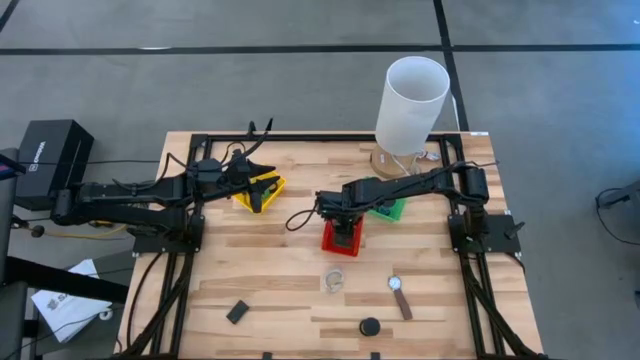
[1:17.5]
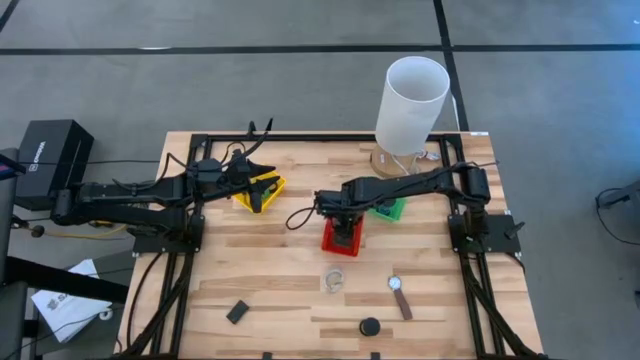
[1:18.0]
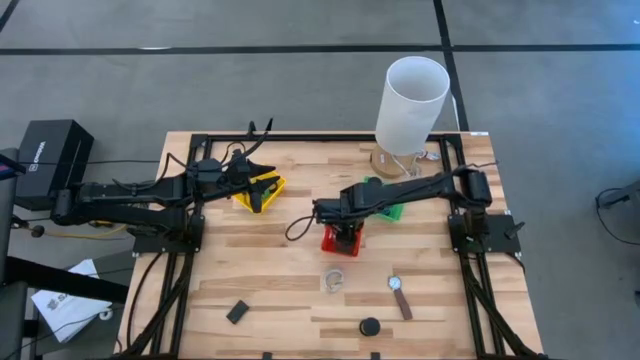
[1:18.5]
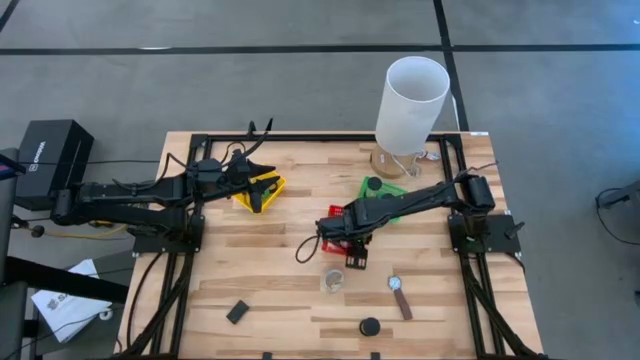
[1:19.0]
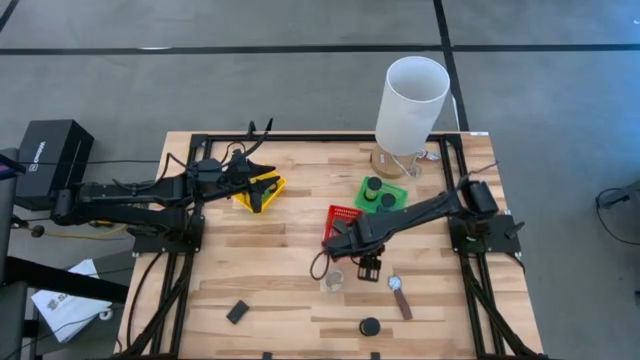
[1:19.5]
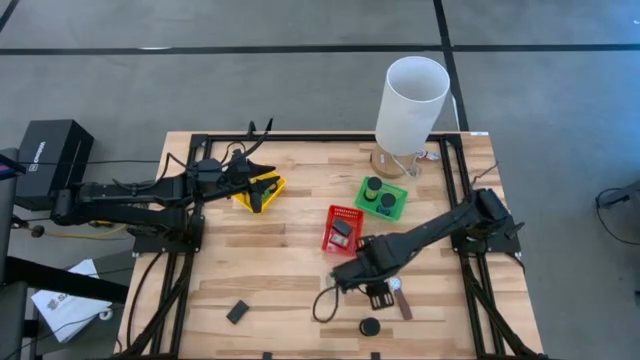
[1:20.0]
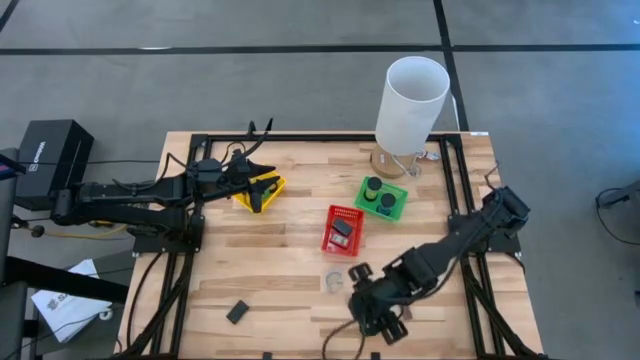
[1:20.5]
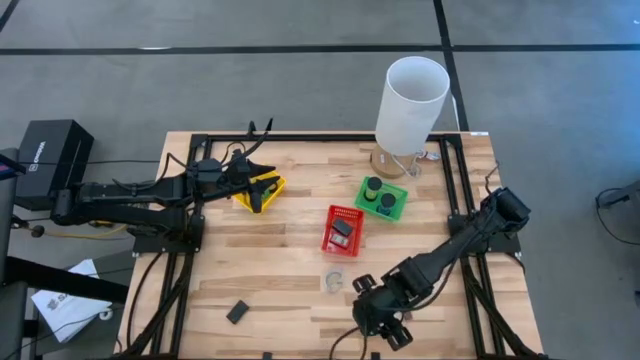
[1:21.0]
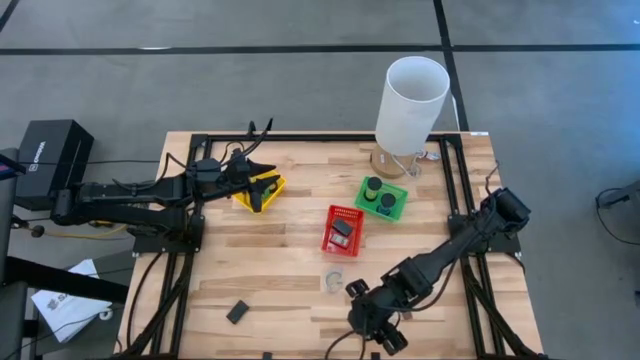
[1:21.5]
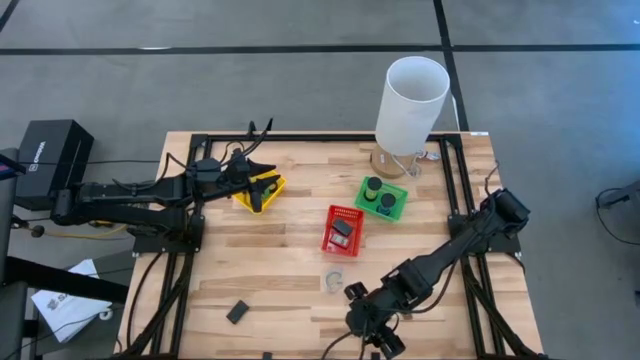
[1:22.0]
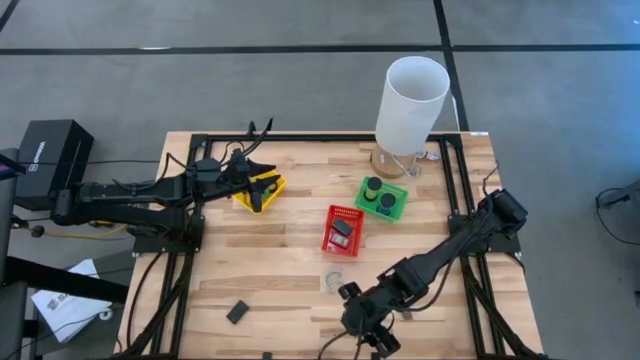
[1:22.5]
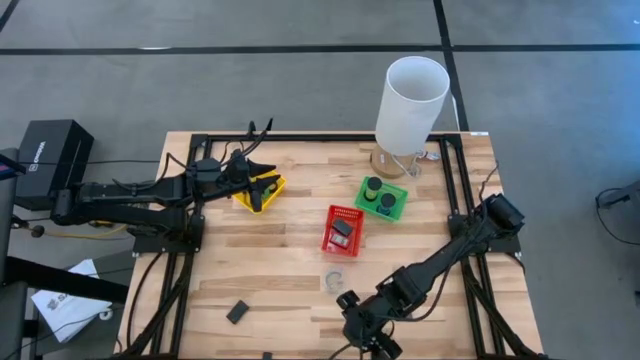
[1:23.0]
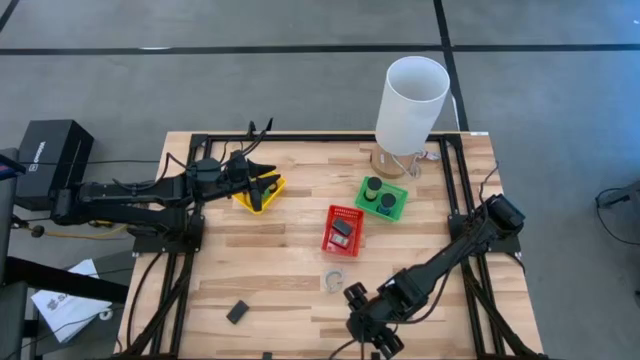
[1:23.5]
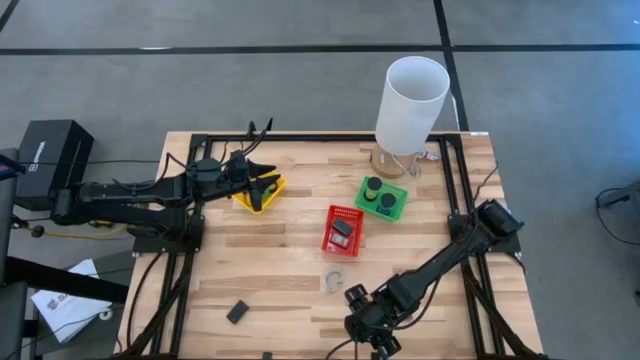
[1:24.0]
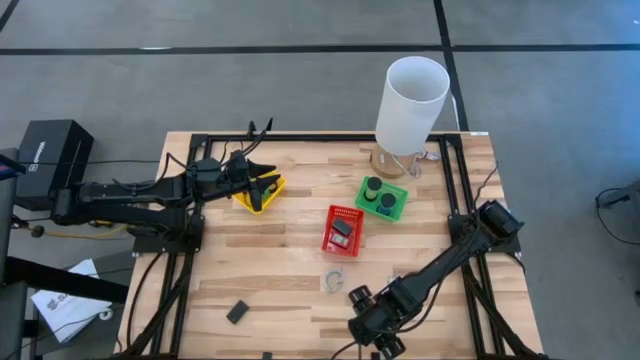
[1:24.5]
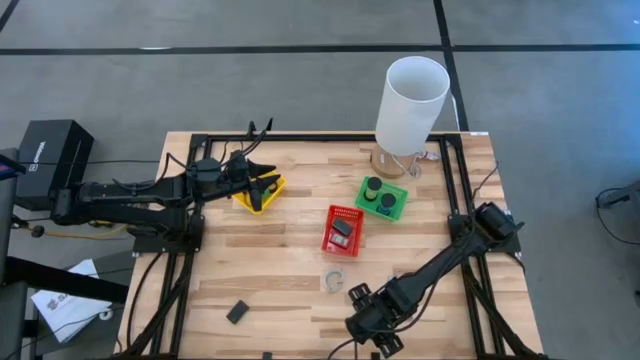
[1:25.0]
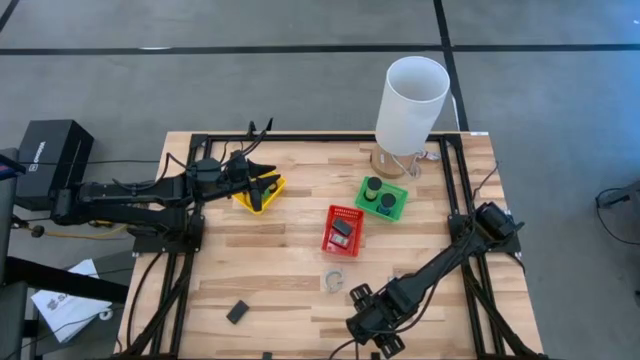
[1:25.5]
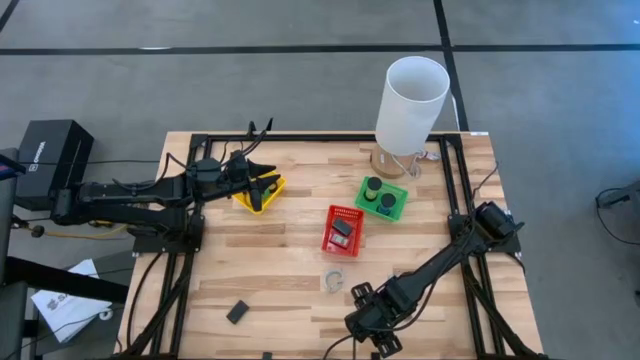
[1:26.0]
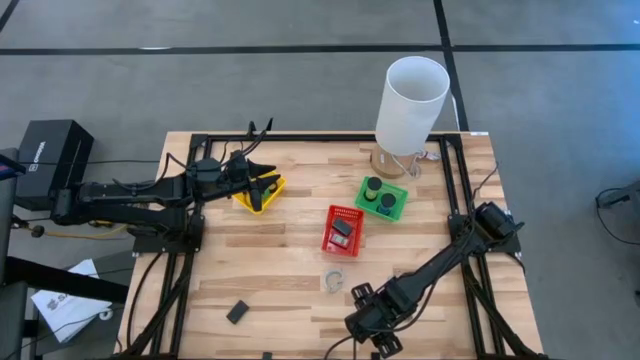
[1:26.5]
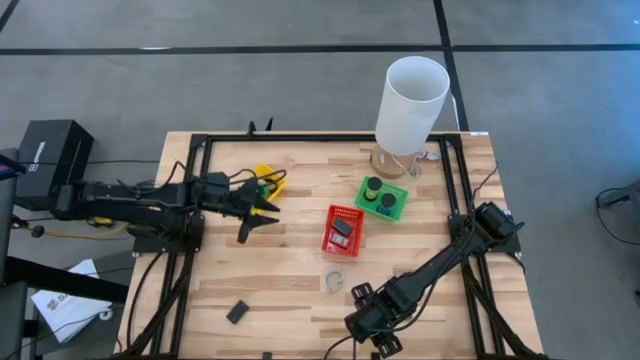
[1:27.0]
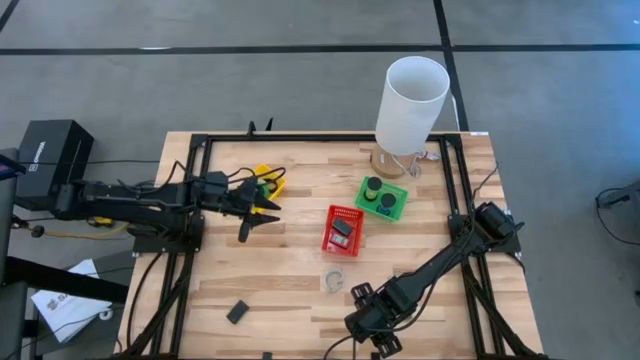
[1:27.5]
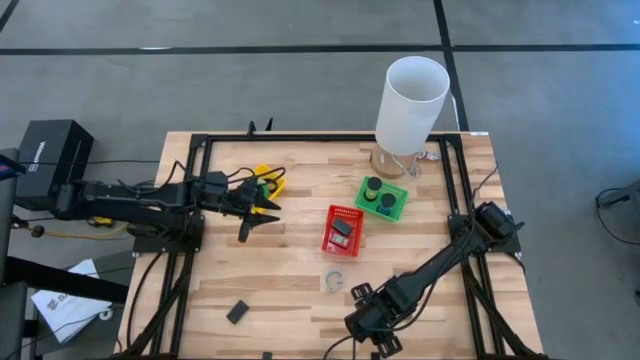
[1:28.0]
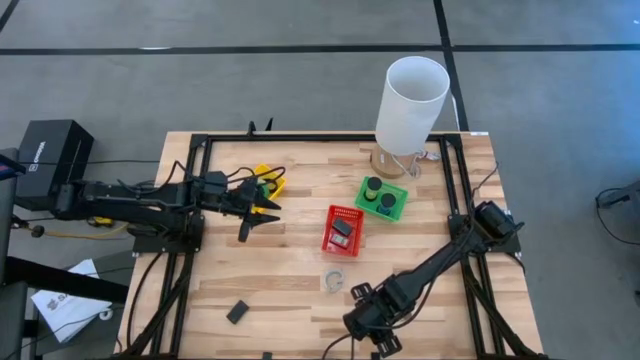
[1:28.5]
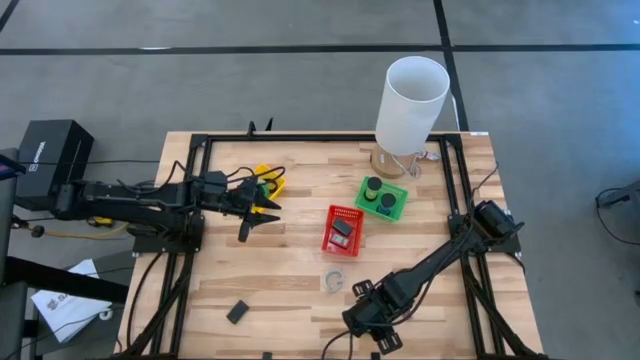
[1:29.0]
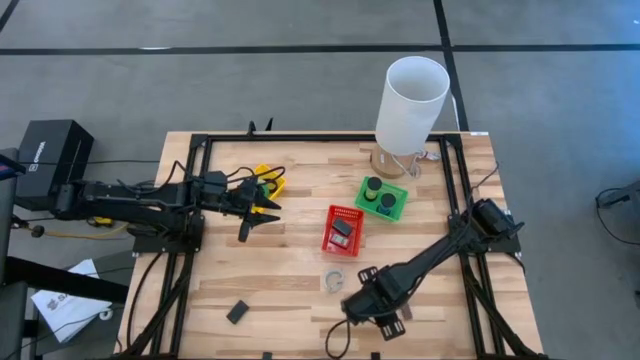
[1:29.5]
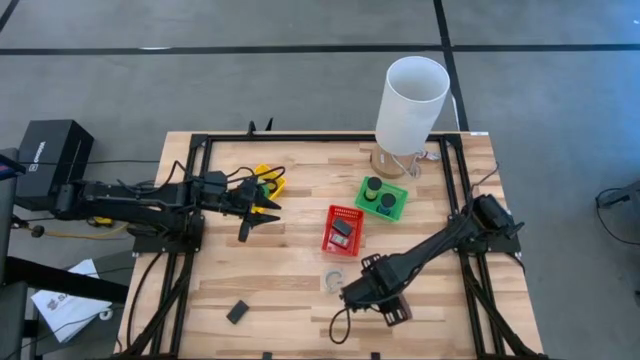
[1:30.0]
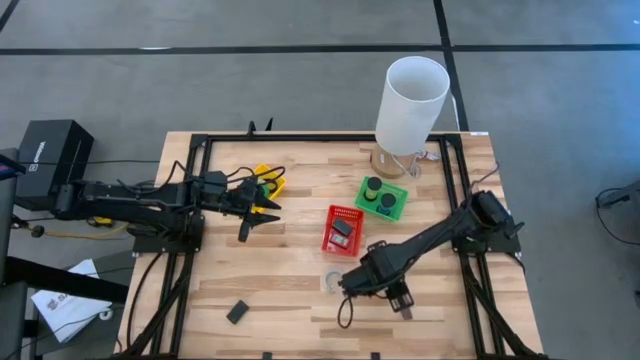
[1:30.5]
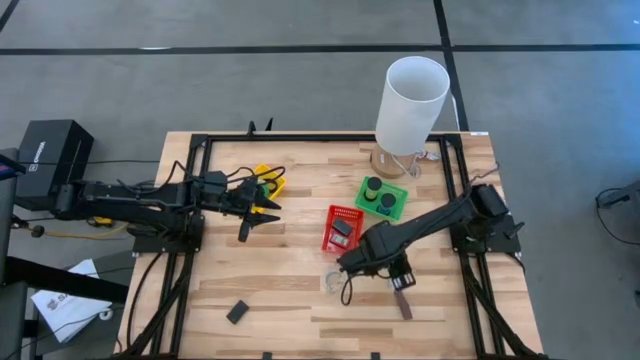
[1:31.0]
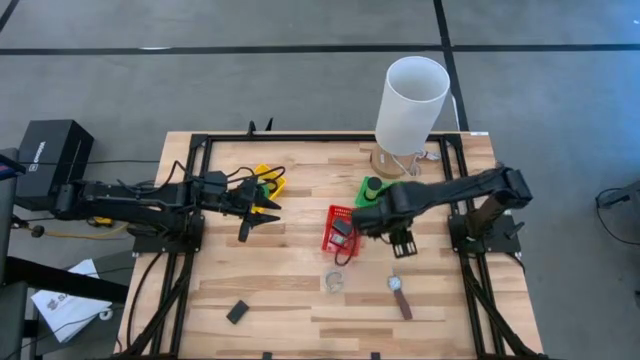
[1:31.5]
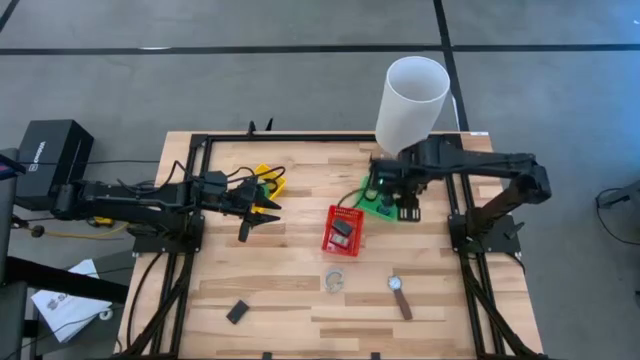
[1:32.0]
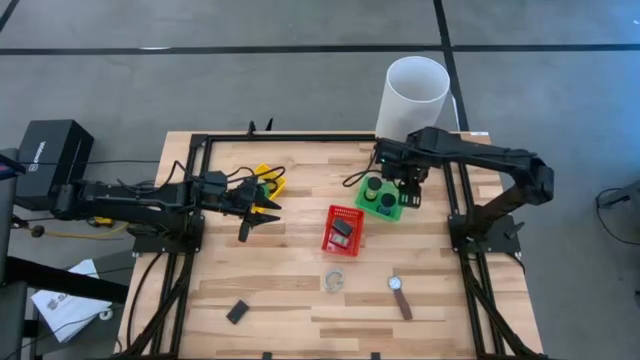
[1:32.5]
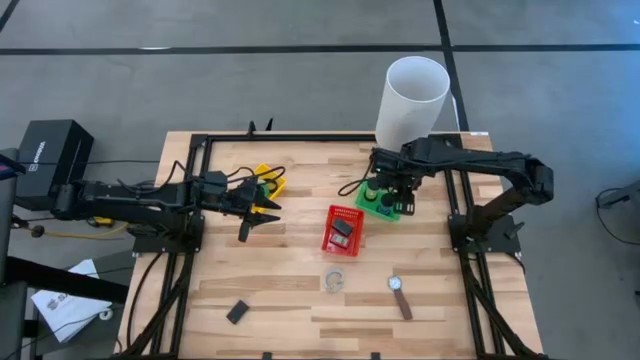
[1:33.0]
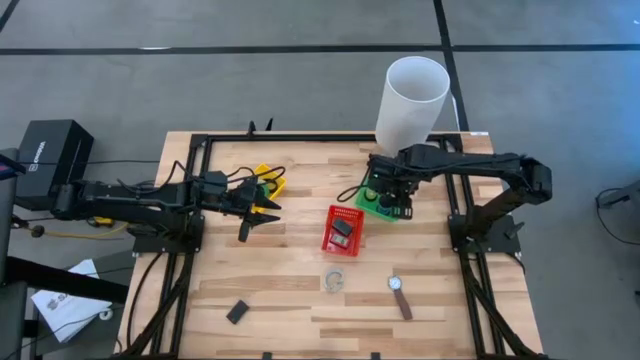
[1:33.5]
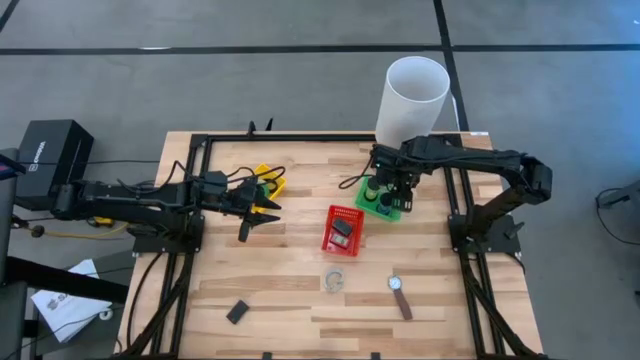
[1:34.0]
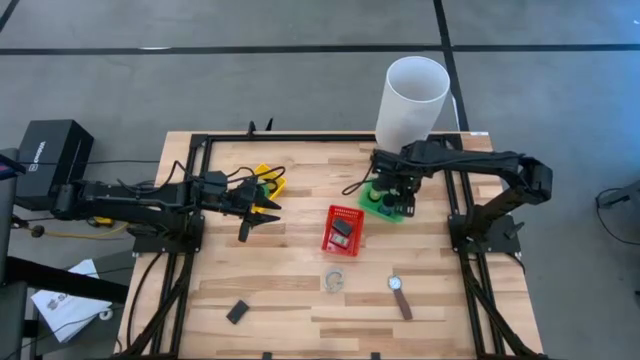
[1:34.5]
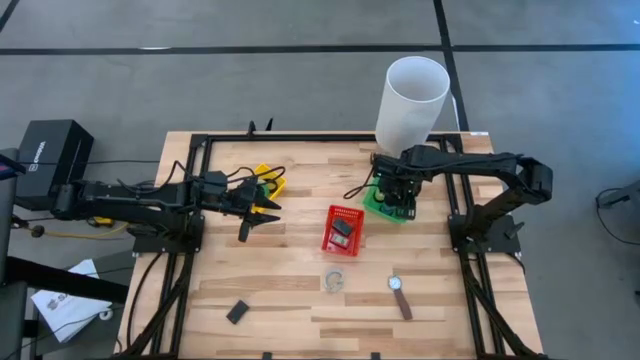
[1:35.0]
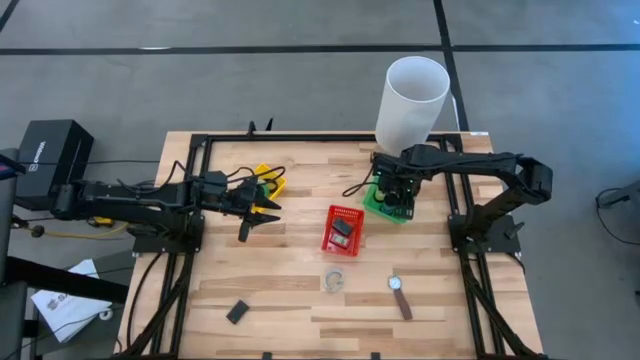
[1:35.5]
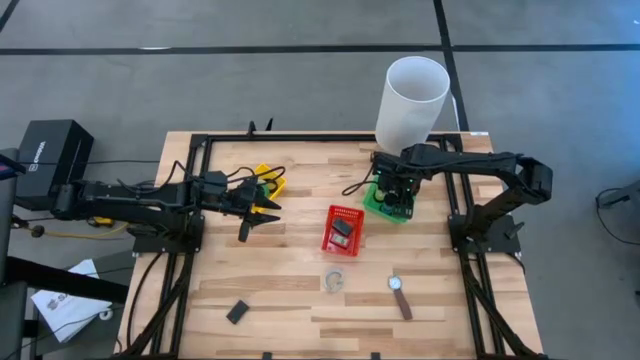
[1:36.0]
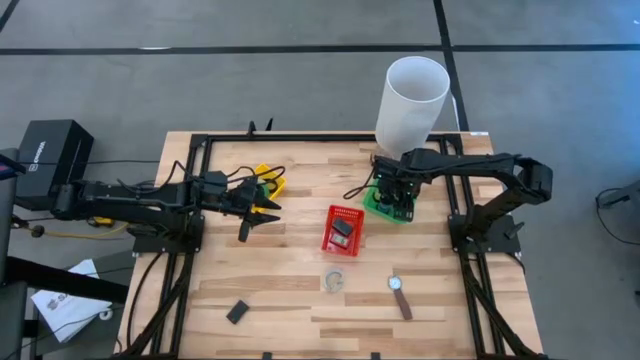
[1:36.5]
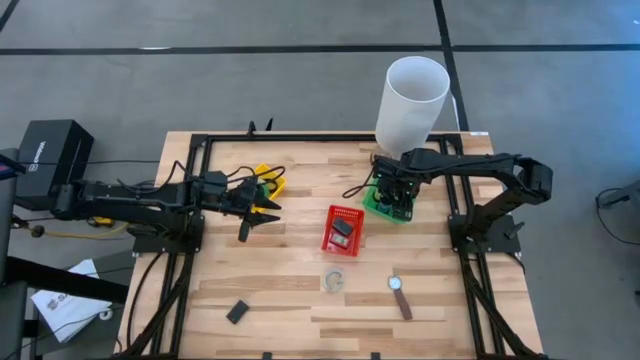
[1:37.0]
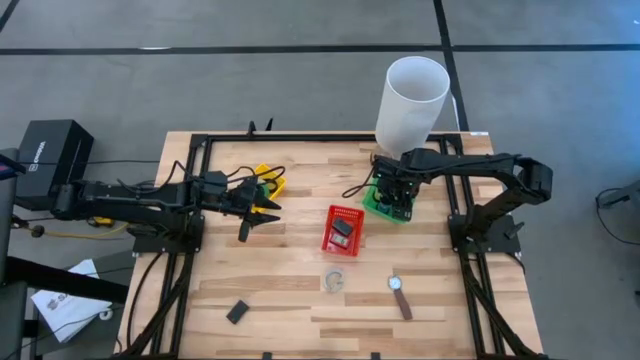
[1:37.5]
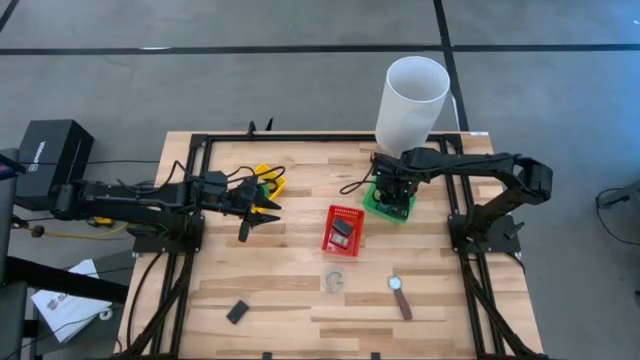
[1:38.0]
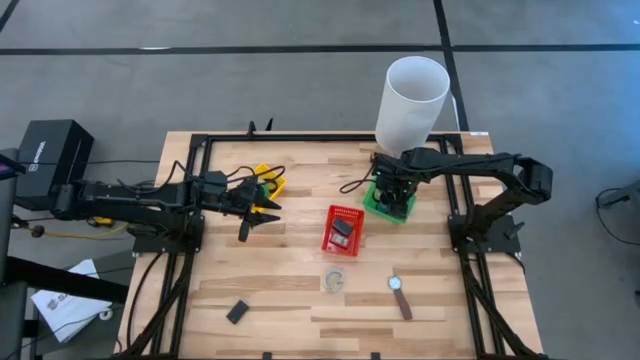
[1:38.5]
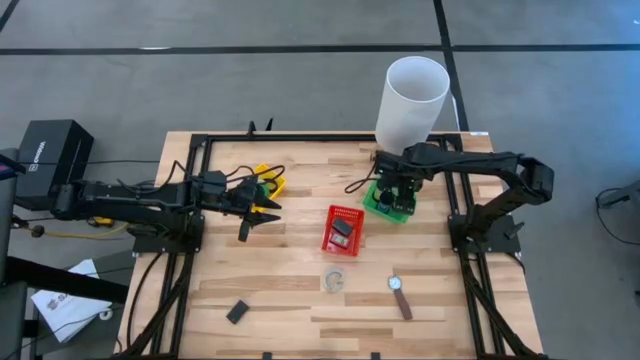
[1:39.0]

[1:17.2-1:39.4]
Task: Pick & Place Office items
Put the black hourglass into the green bin
